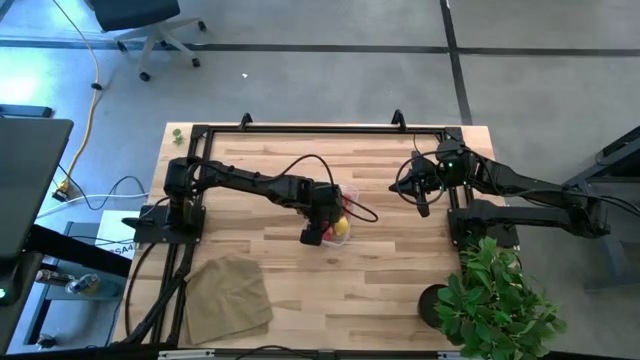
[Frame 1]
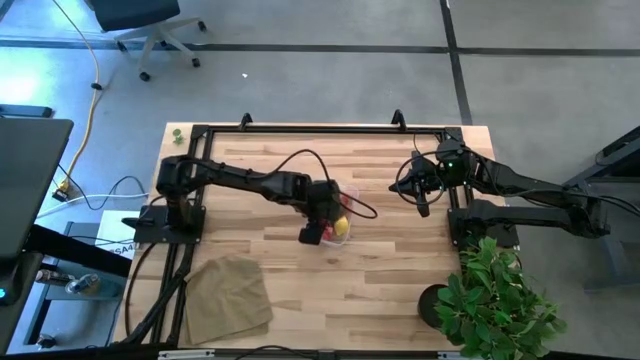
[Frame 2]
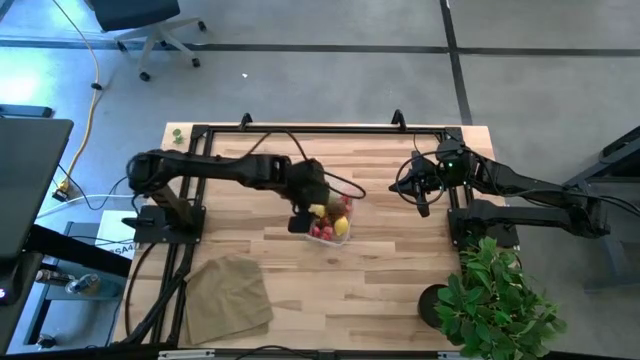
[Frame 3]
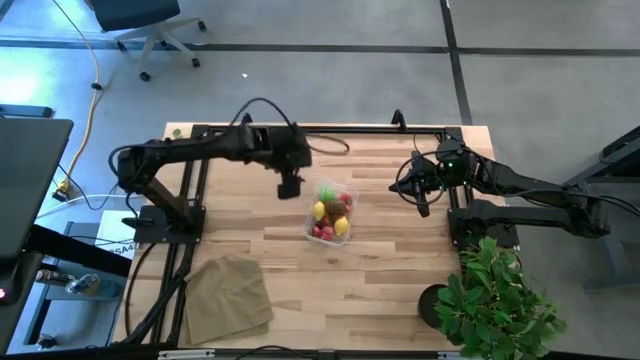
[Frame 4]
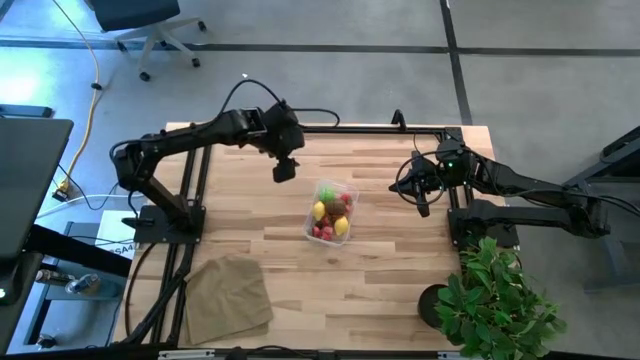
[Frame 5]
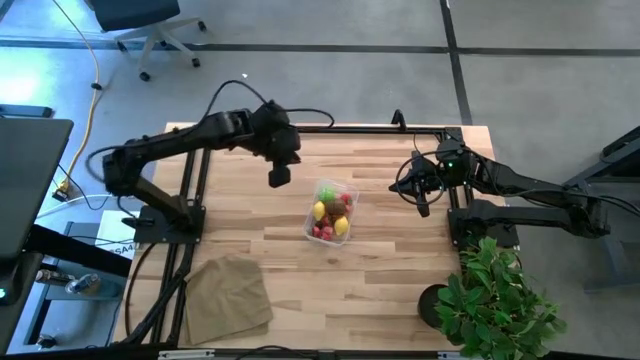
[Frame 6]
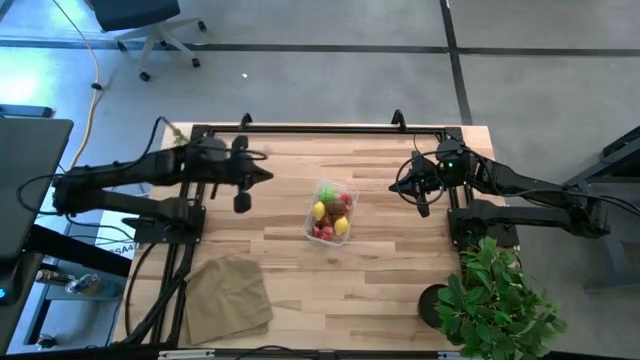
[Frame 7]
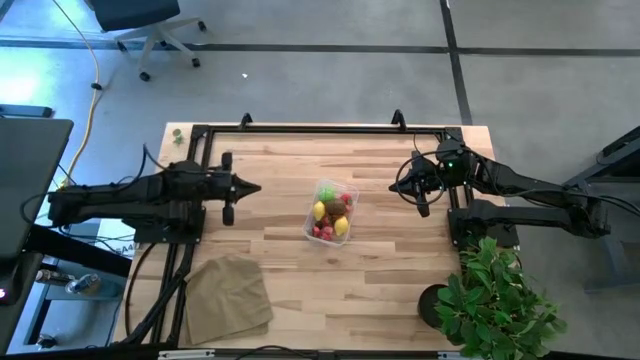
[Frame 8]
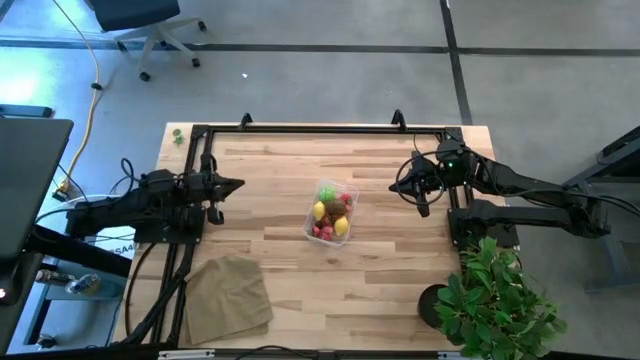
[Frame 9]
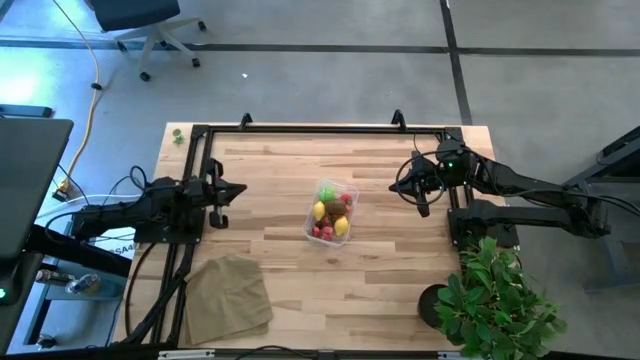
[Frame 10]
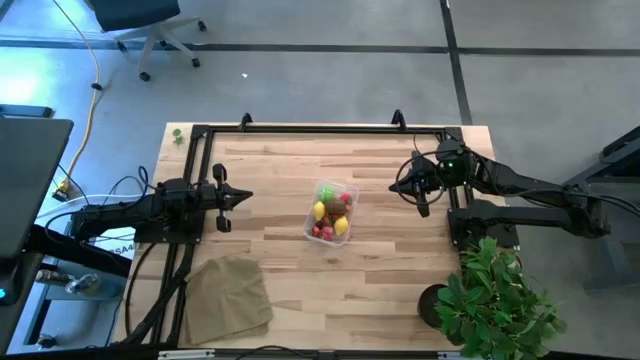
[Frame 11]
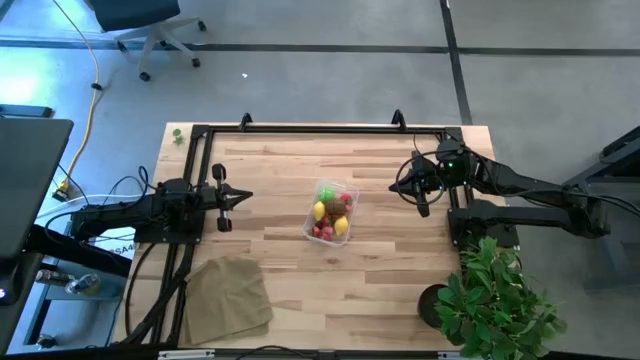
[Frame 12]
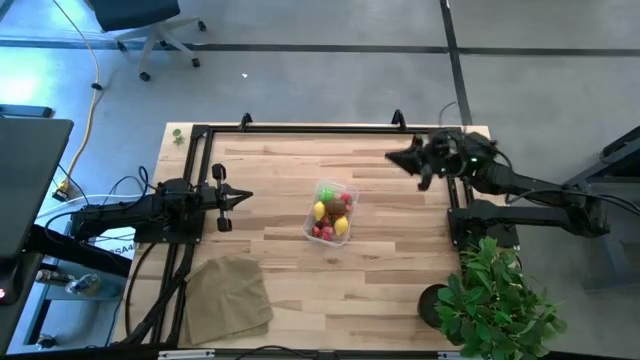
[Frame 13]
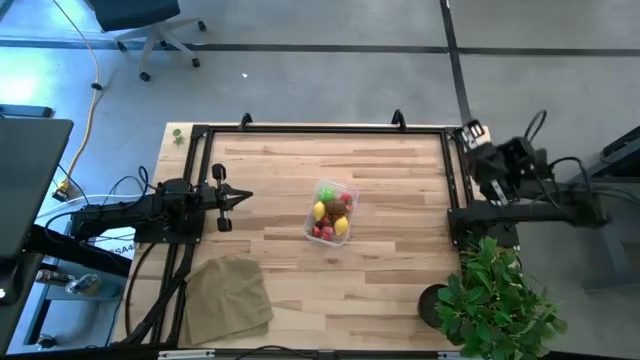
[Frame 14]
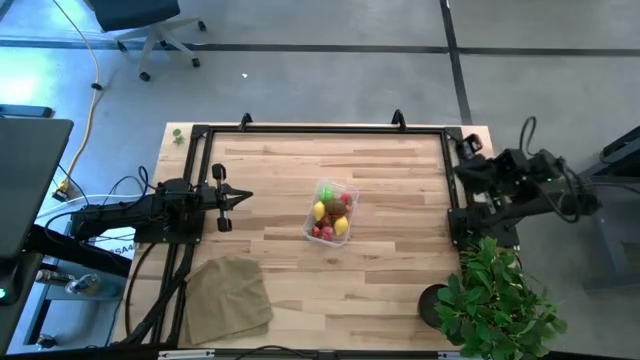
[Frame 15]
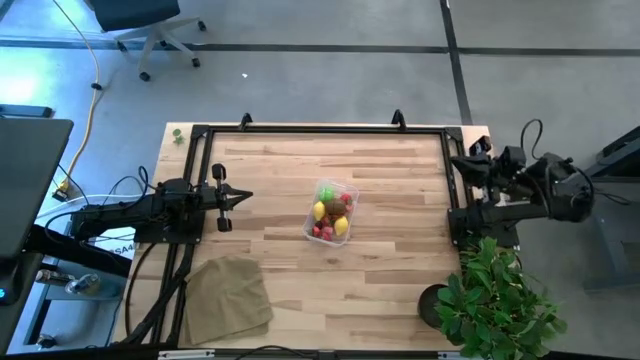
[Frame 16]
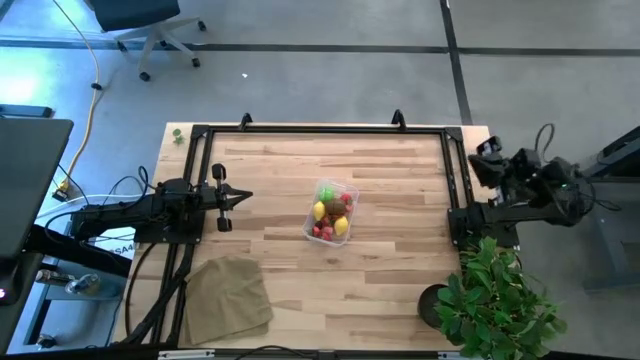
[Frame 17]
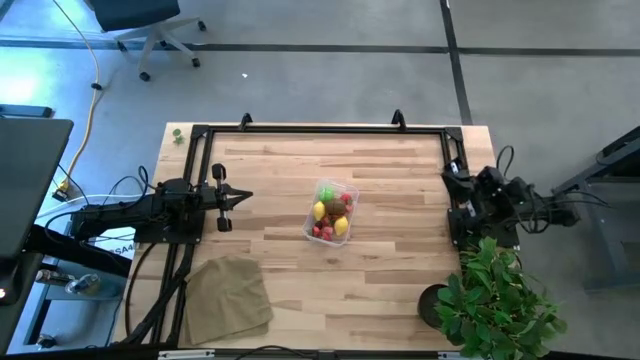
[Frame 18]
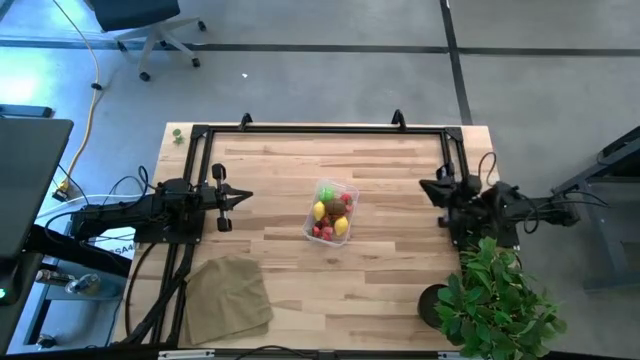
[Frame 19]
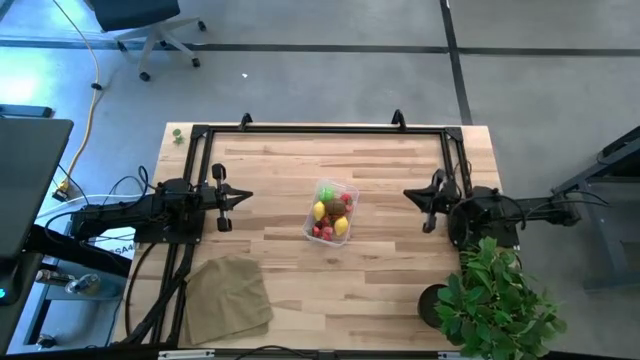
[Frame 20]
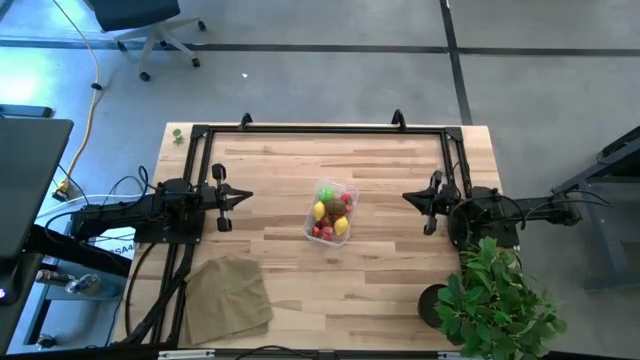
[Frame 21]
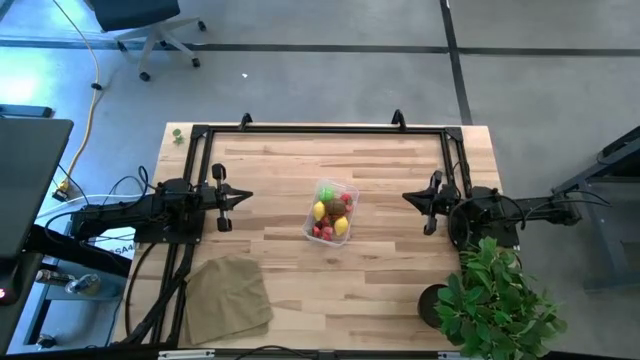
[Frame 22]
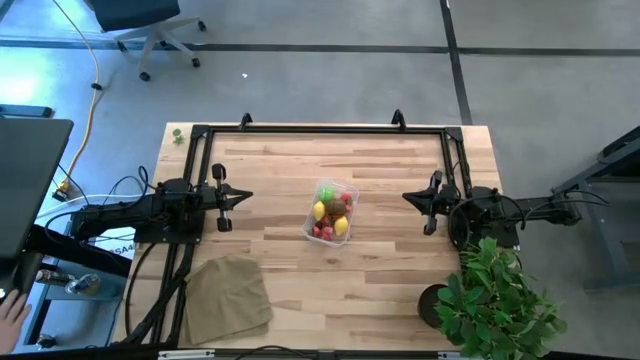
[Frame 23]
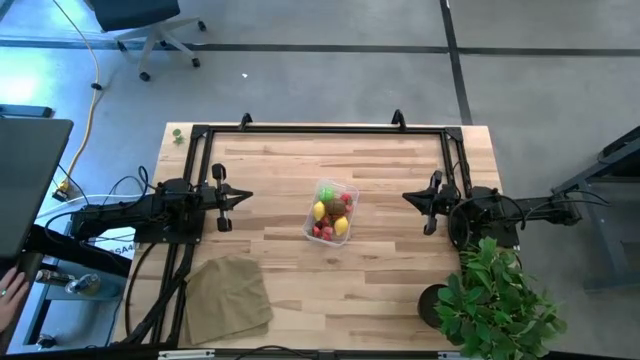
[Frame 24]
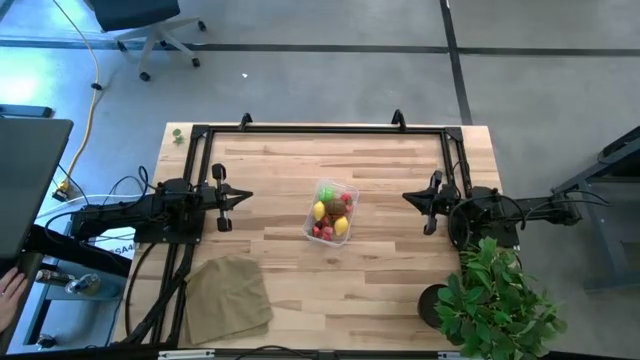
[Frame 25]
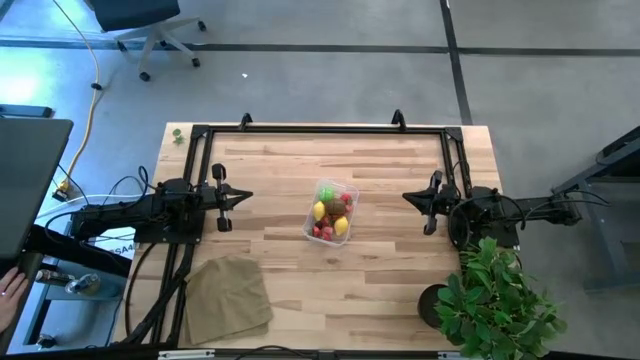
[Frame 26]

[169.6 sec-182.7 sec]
Task: Pick and placing Produce into tupperware
Return to Home Position

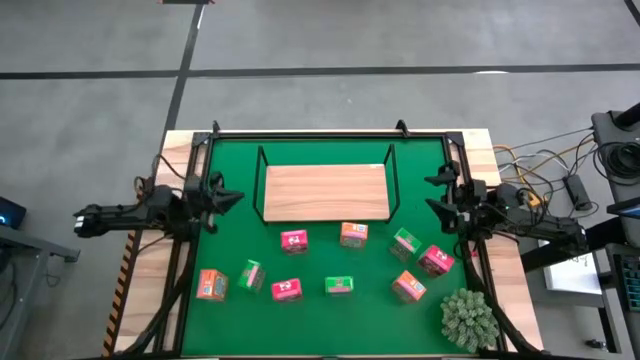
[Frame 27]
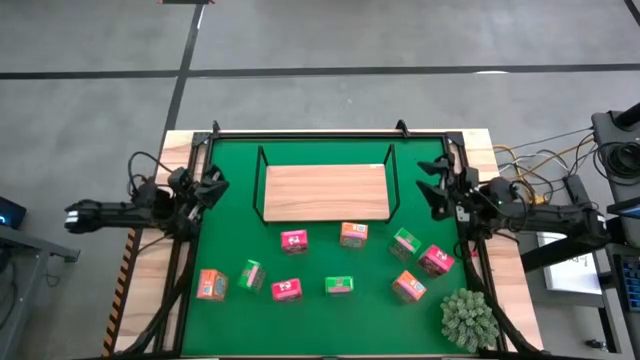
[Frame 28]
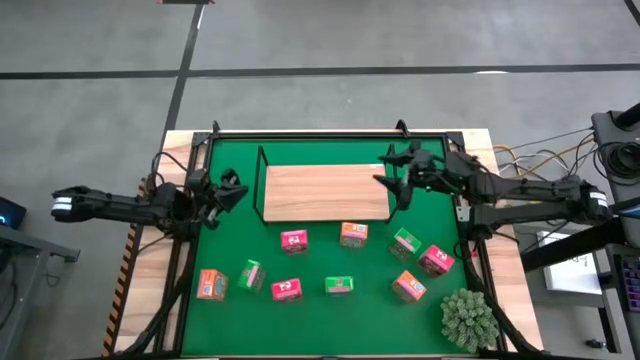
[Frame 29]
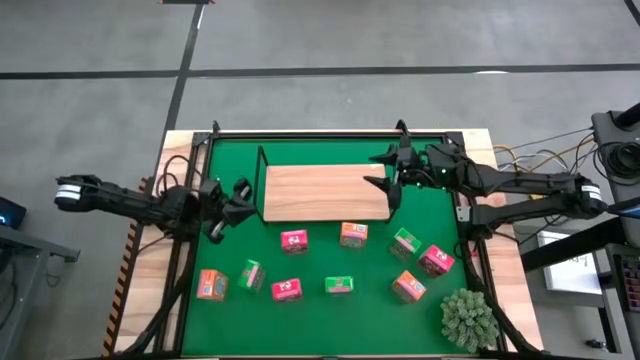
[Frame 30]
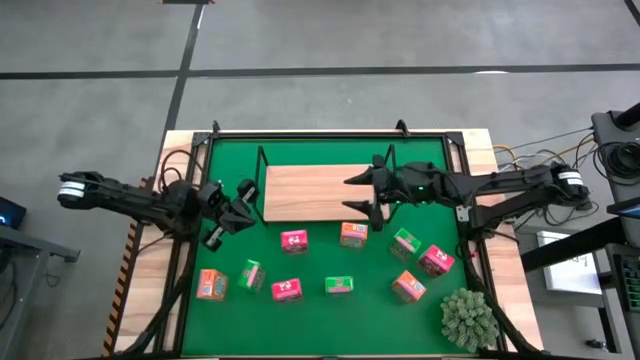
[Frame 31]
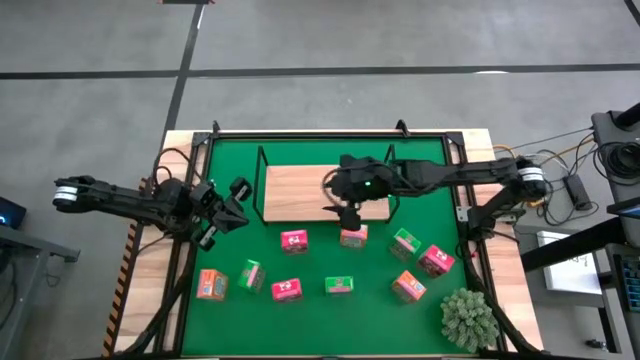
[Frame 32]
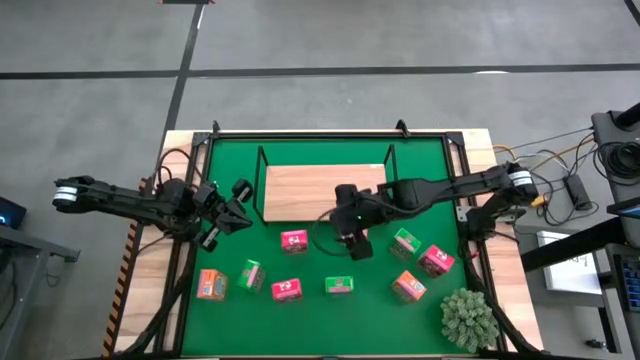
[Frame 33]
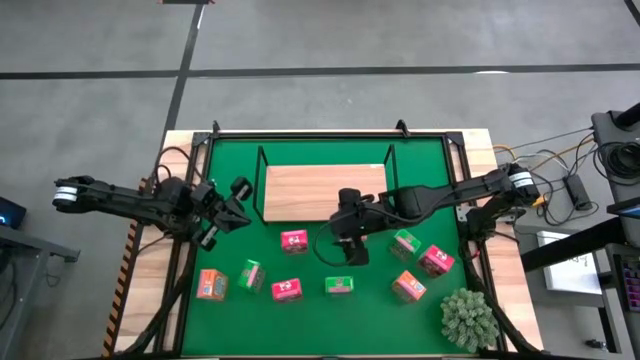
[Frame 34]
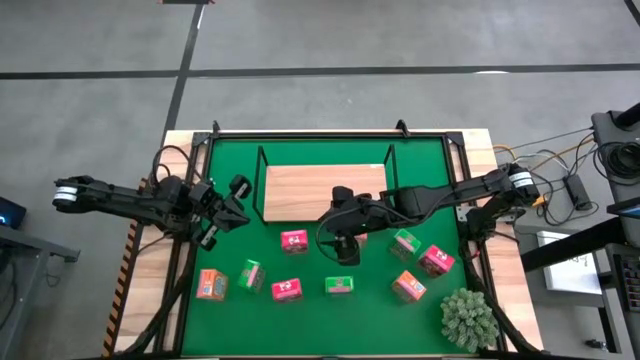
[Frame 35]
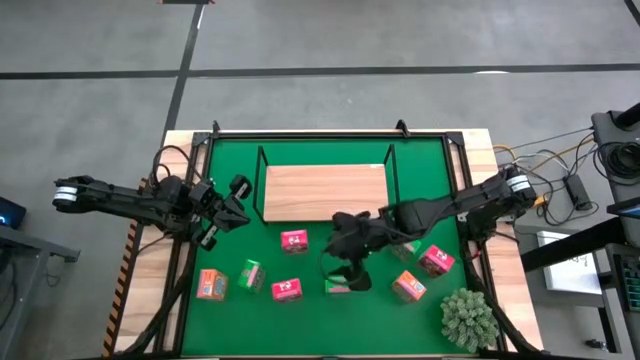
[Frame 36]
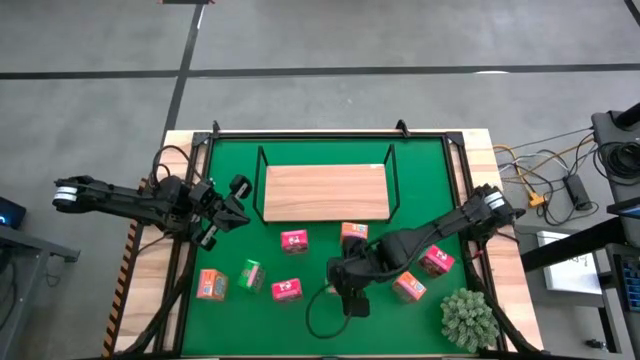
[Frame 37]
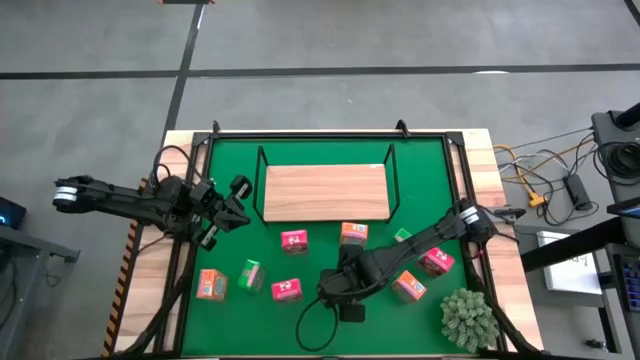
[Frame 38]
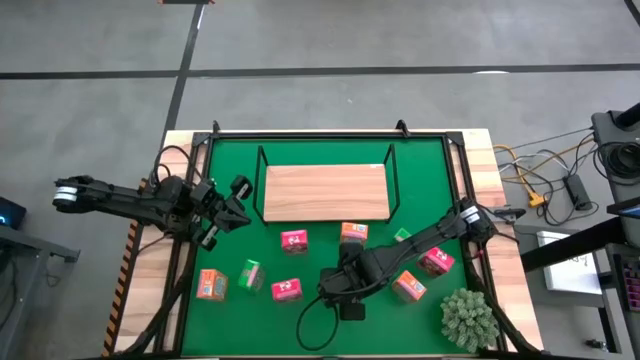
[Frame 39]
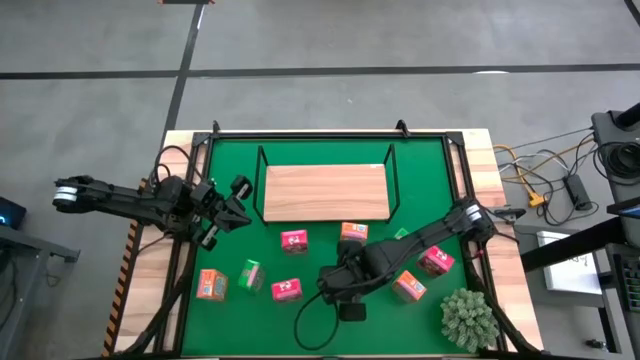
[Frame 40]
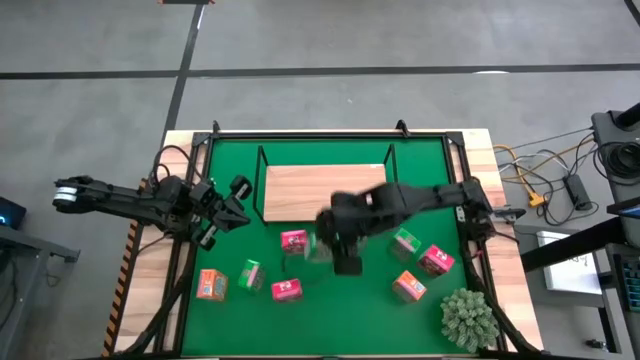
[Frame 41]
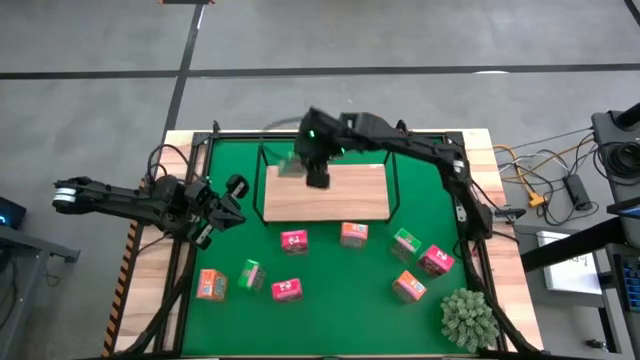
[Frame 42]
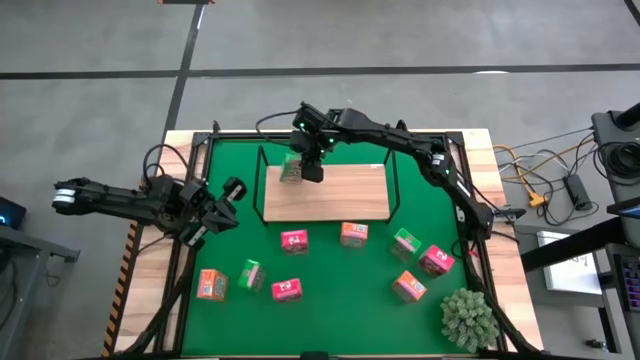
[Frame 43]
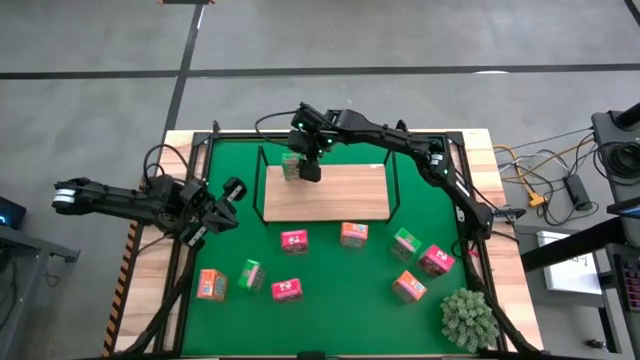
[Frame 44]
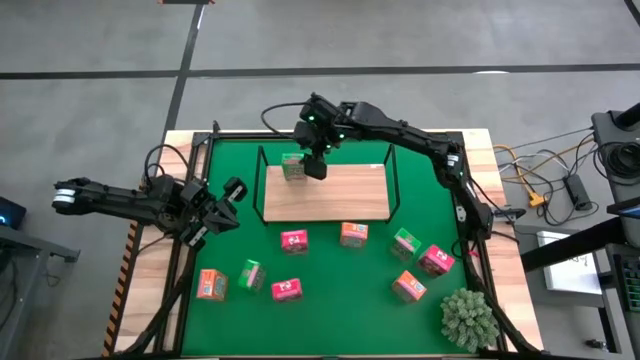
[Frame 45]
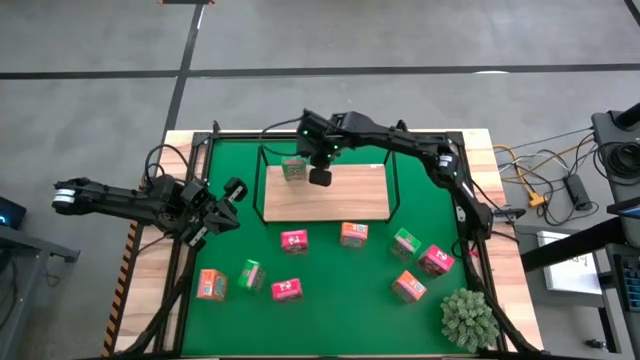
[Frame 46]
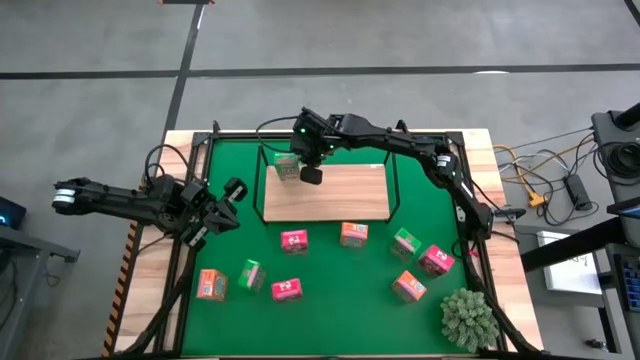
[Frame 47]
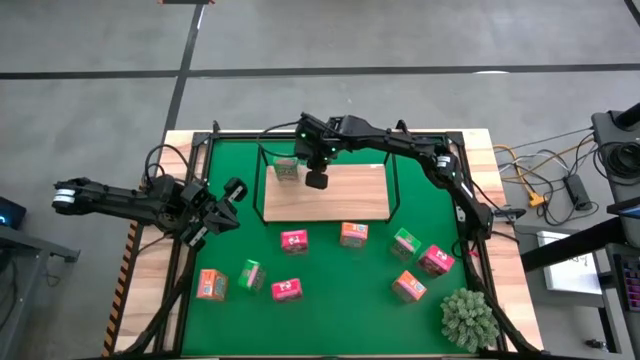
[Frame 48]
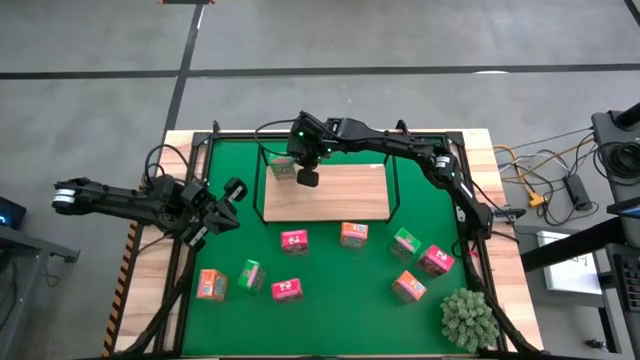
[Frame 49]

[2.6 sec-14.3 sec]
Task: Stack cereal on shelf
Put the middle green cereal box on the shelf
